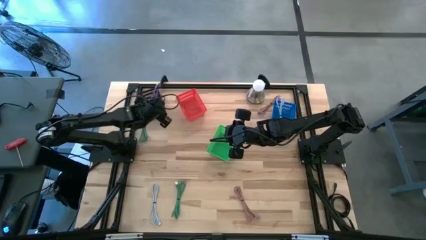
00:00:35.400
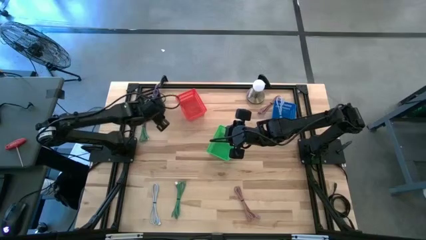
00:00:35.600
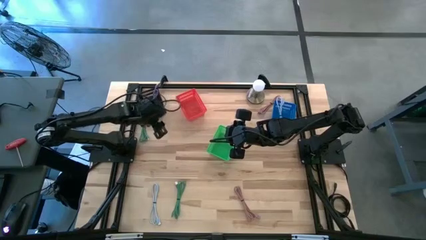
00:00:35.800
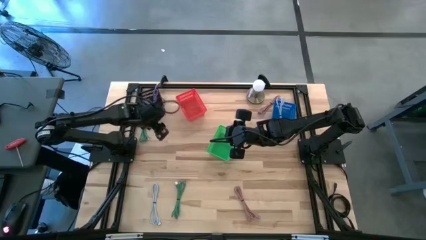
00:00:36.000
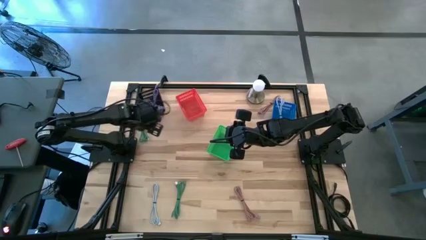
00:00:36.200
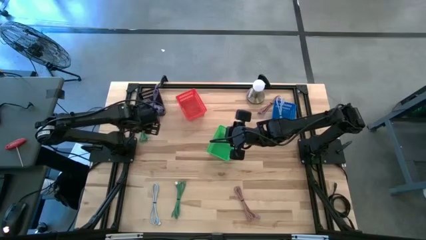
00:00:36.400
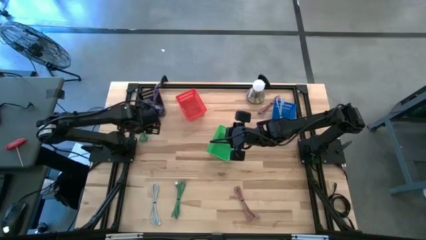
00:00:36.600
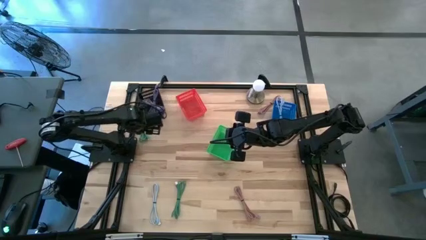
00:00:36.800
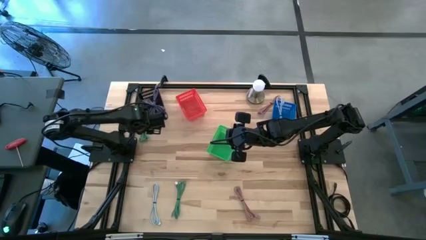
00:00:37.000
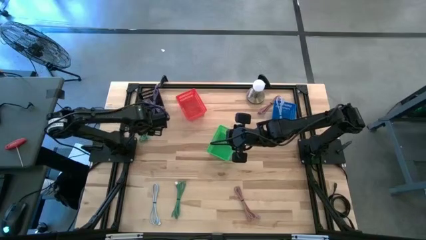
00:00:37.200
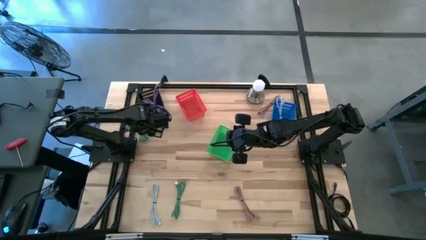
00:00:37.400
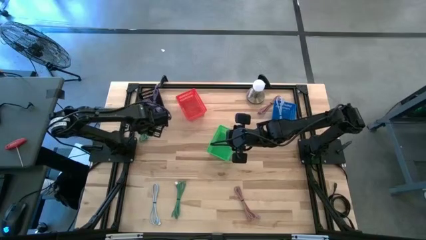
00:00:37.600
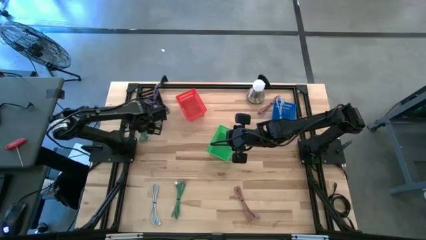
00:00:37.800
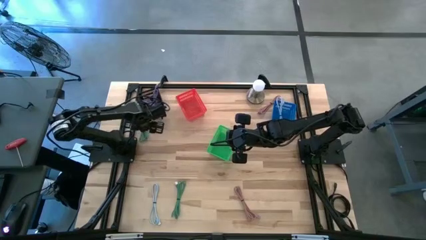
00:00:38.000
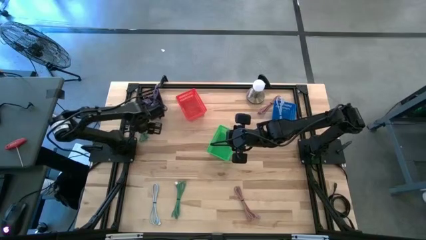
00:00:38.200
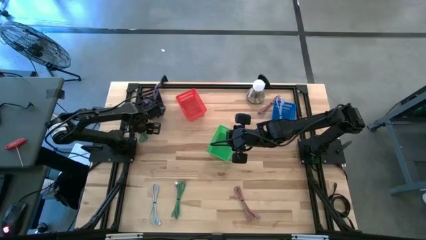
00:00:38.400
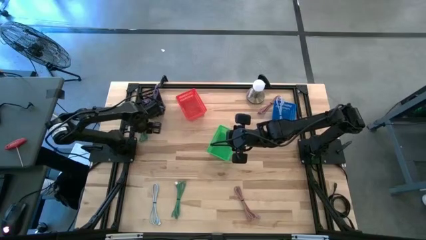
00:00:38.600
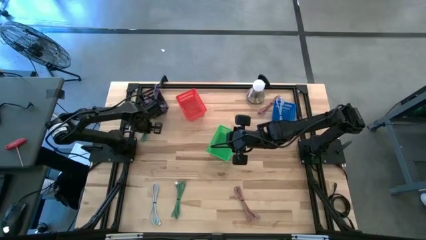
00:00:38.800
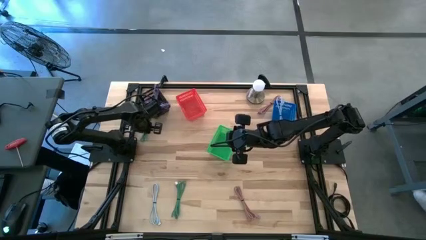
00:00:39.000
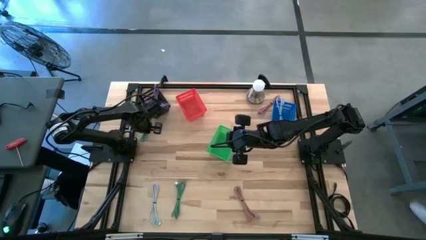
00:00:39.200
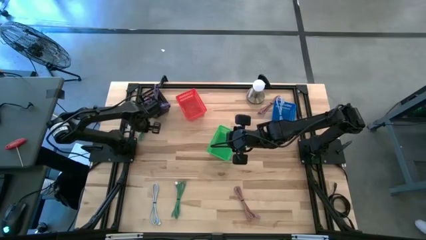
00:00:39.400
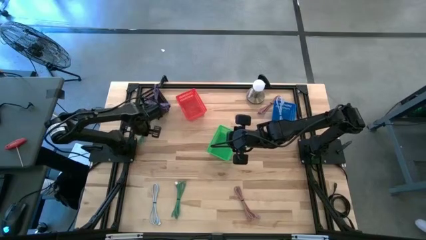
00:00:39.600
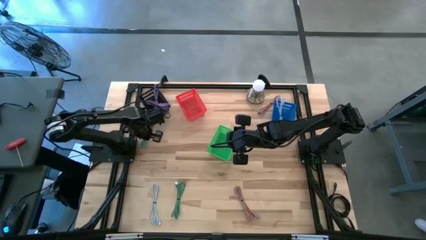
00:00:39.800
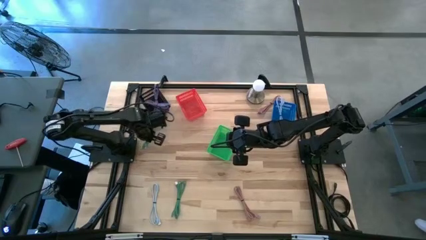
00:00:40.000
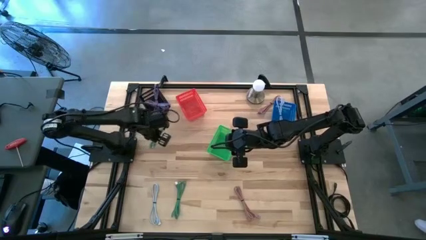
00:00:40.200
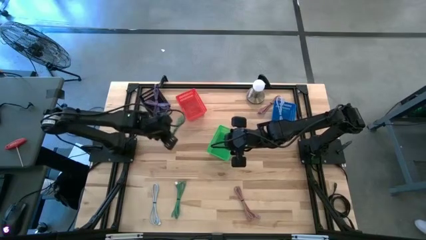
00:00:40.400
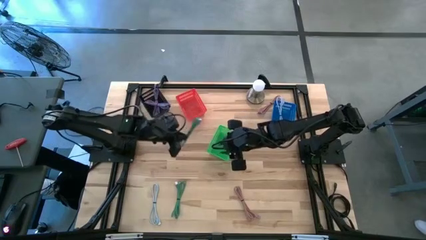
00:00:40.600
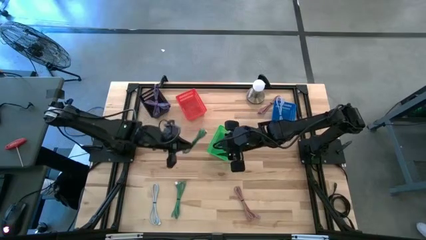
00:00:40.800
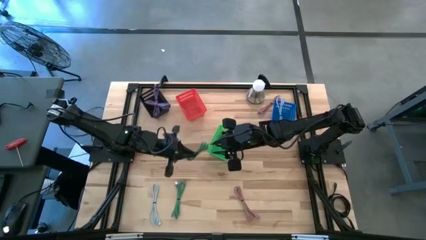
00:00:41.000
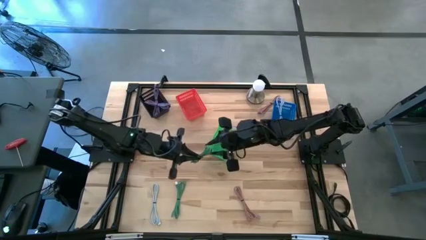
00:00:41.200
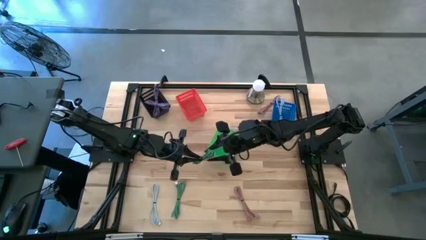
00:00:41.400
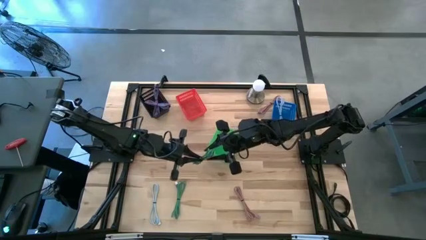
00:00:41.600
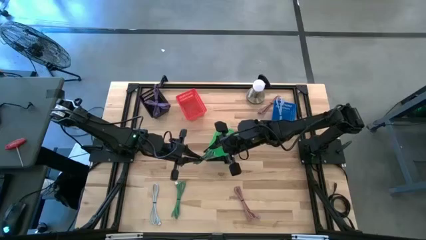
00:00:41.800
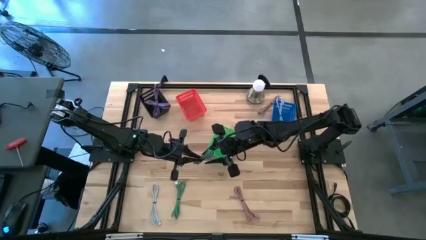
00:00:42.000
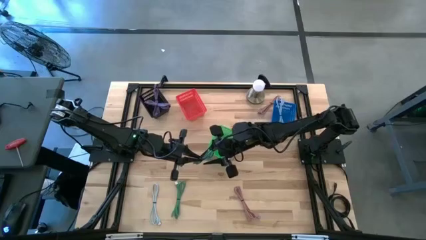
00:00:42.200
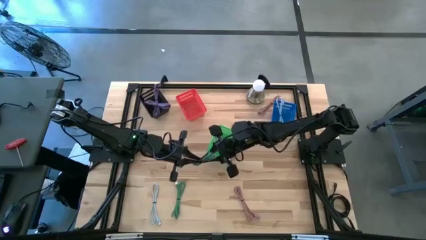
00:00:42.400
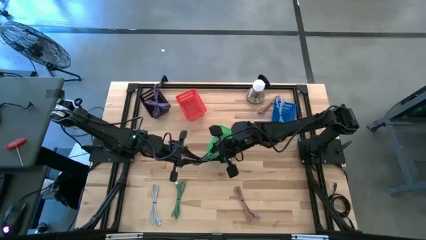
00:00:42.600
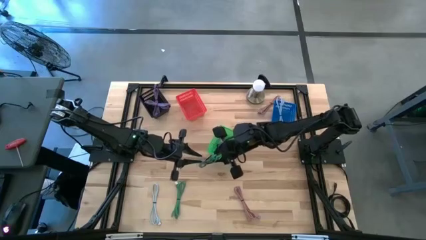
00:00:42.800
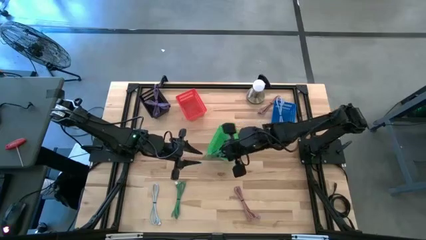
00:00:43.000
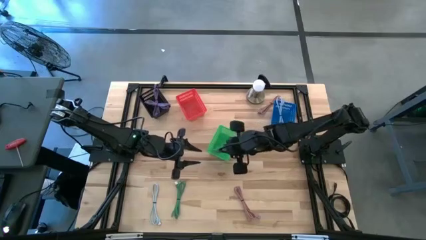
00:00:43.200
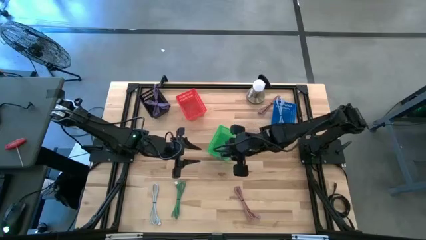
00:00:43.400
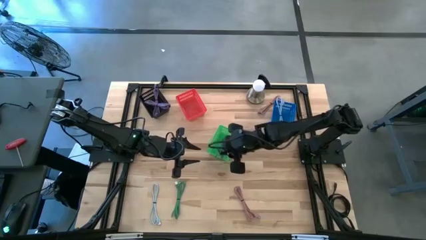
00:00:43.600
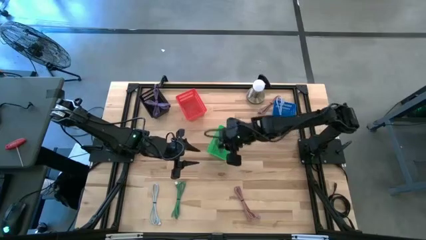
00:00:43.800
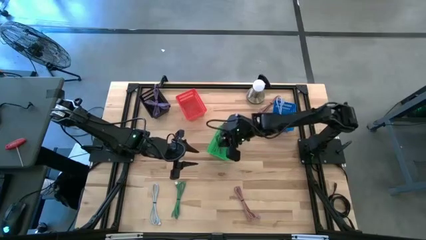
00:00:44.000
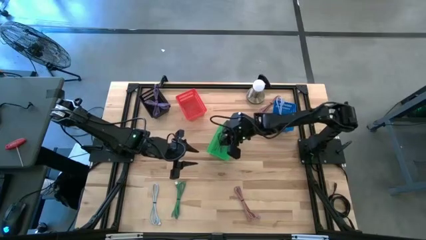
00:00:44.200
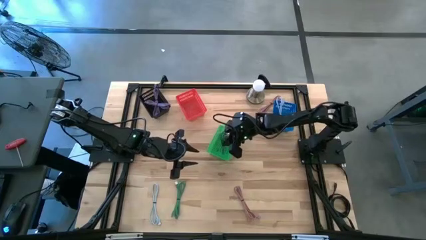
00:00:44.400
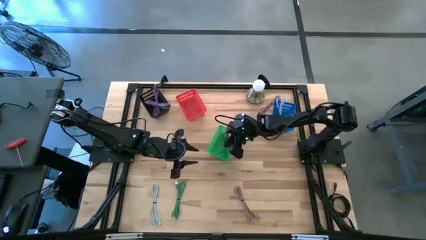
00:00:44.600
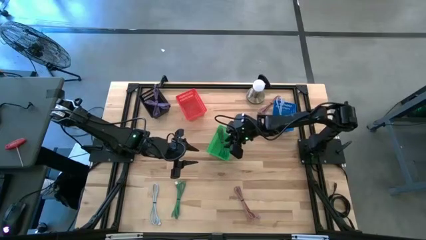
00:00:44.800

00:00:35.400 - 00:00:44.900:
Task: Pick & Place USB Port
Put the top green charger cable into the green basket

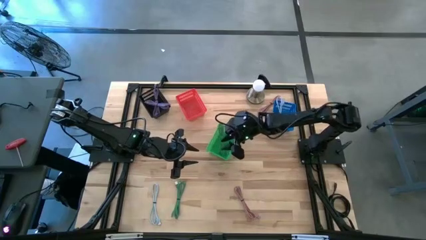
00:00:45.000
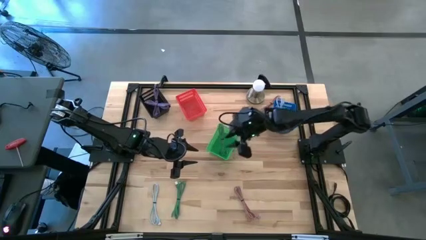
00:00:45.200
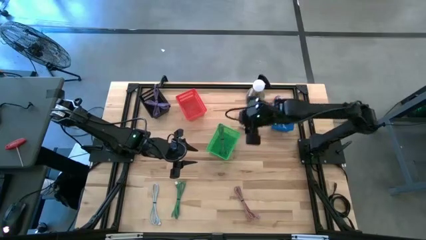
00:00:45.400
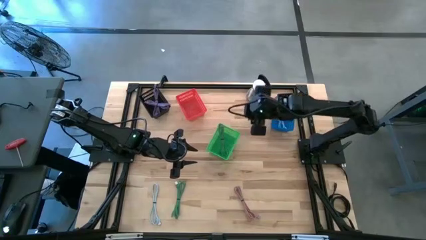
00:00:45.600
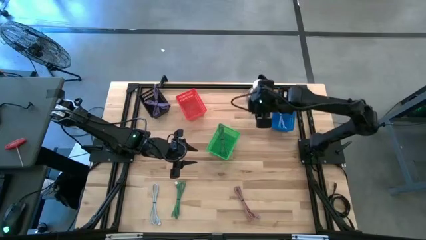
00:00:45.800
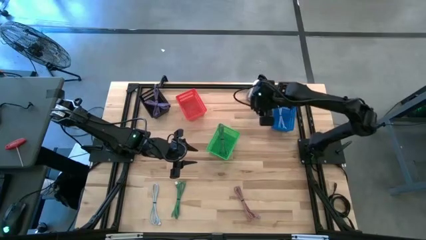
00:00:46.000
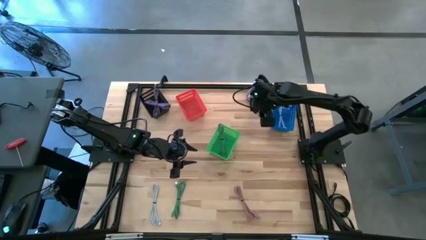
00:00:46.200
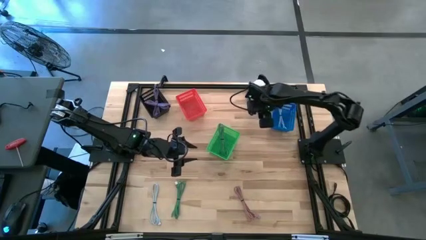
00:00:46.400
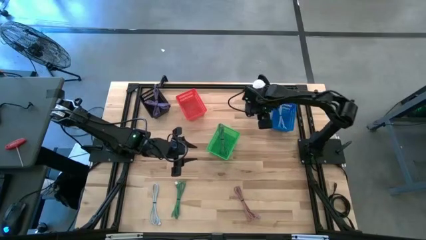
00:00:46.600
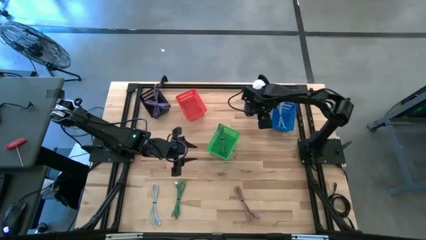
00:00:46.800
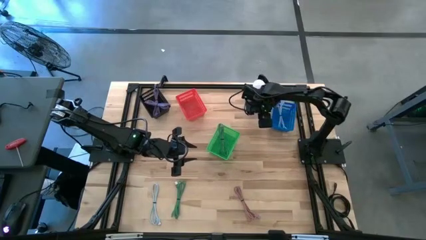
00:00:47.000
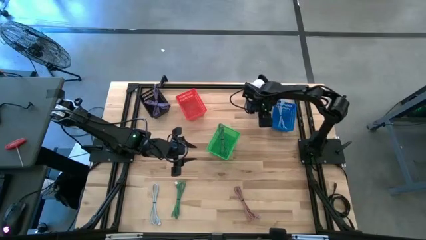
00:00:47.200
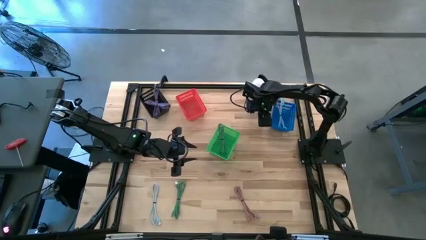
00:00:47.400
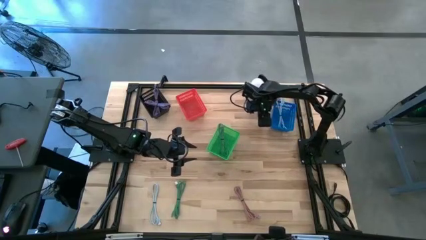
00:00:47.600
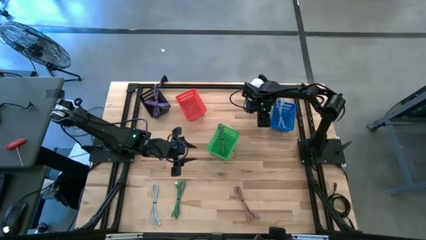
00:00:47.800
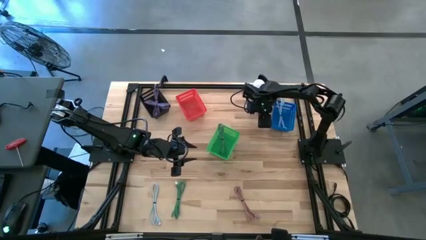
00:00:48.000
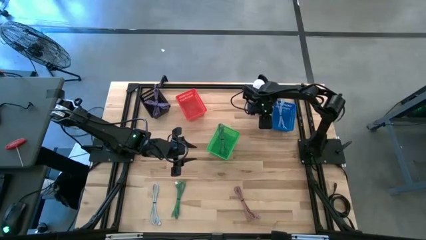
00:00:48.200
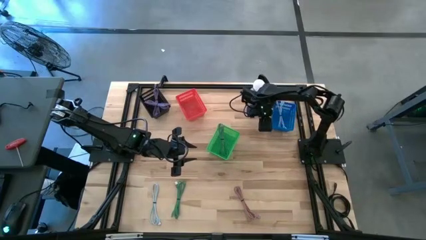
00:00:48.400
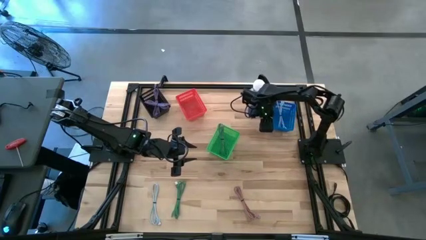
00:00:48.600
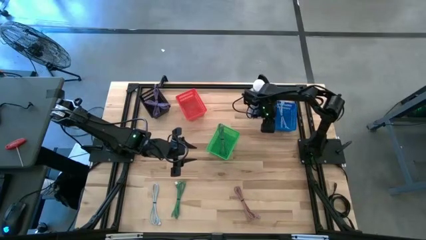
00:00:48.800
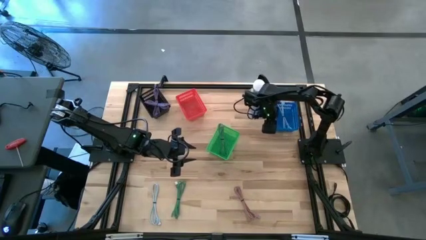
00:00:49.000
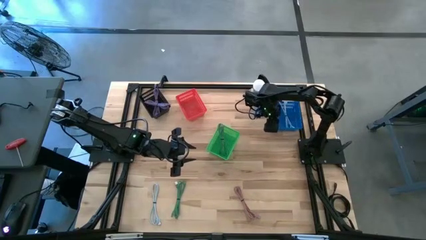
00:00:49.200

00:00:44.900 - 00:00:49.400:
Adjust the blue basket

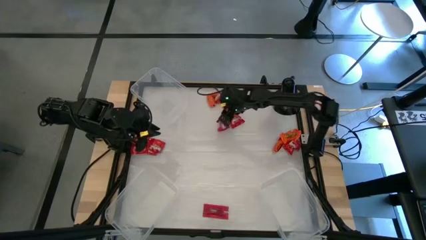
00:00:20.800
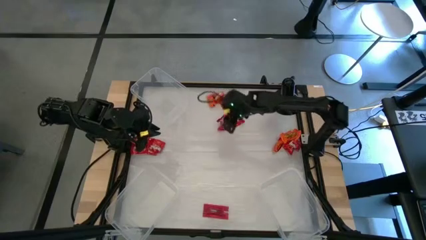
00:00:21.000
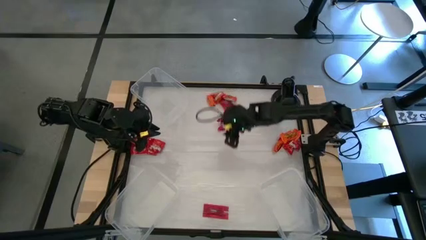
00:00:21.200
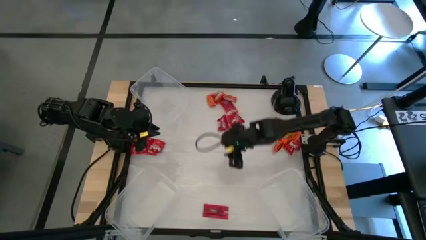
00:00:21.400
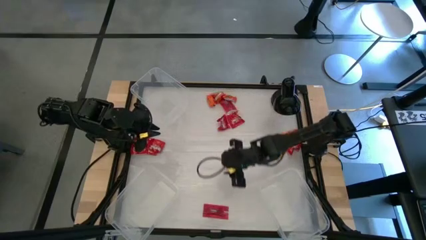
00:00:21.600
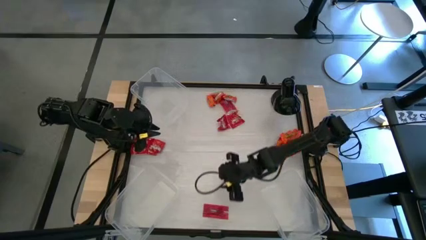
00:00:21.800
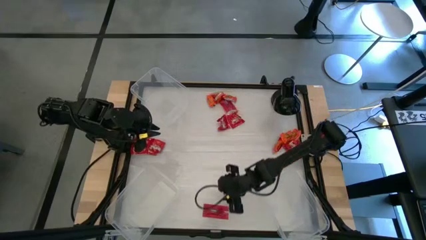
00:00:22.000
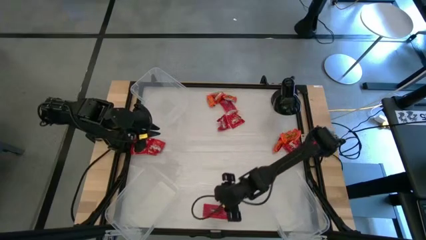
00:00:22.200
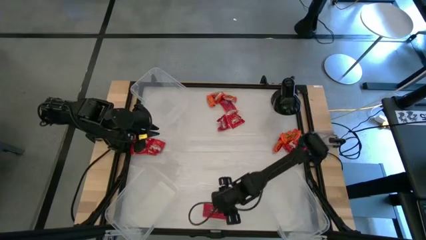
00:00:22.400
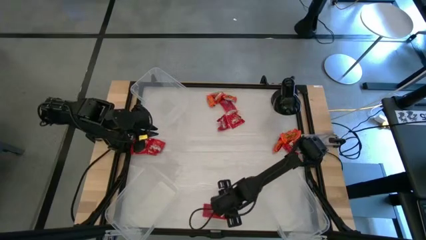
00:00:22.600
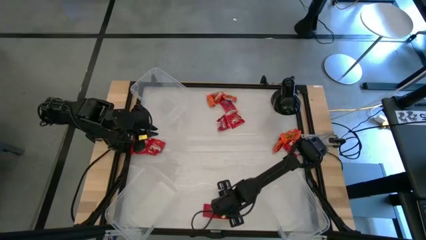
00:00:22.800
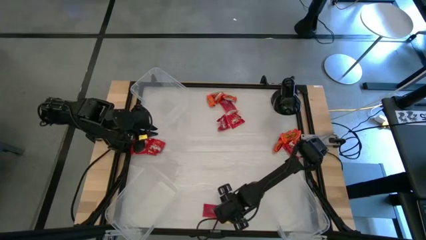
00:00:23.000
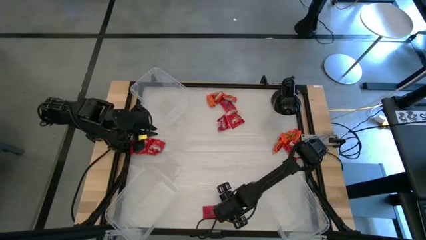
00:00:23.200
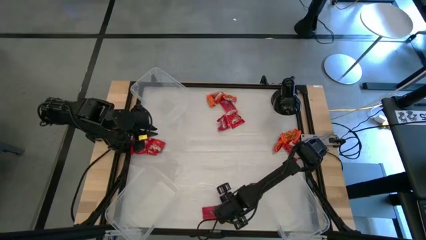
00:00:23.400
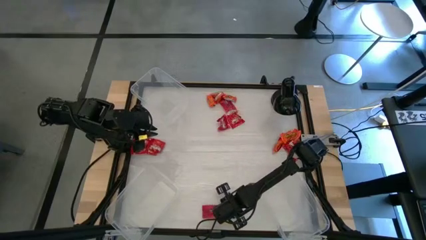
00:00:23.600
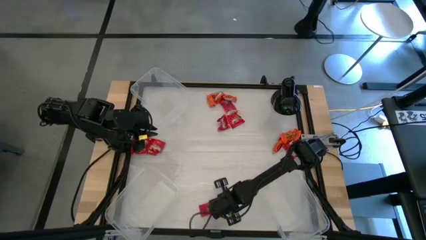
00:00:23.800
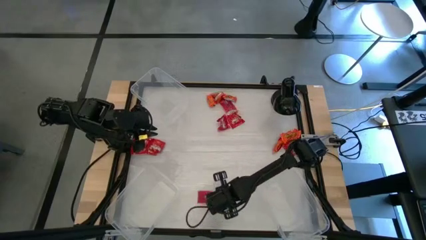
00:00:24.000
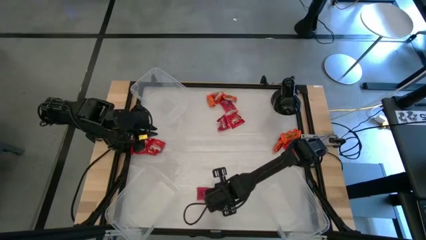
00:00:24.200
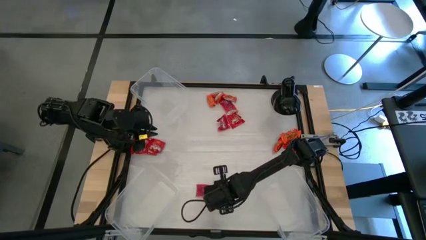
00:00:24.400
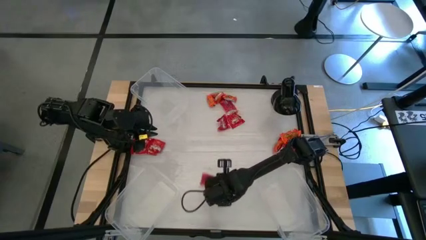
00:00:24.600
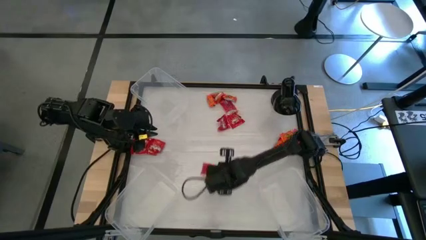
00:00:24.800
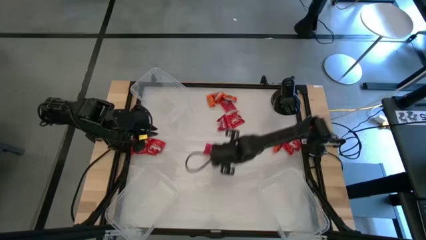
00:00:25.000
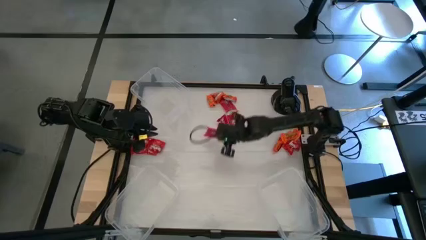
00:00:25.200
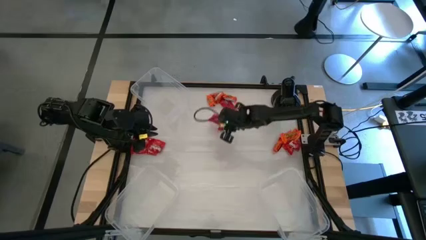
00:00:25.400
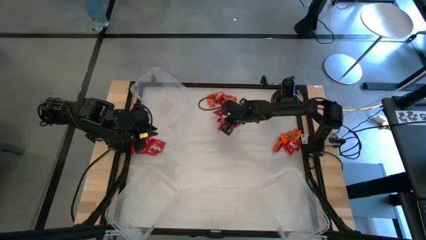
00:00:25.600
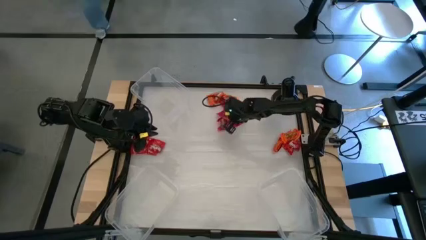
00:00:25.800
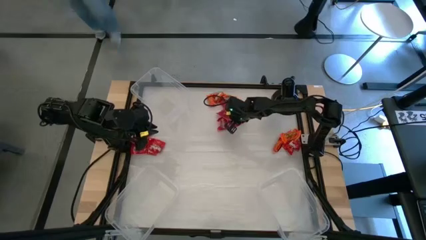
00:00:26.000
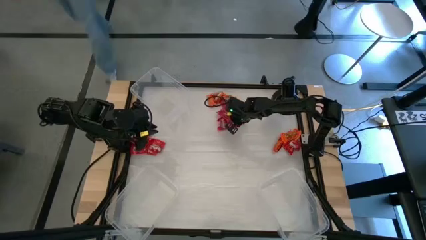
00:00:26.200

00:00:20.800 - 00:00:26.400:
Task: Sort candy
Move the light red candy to the top center of the table
